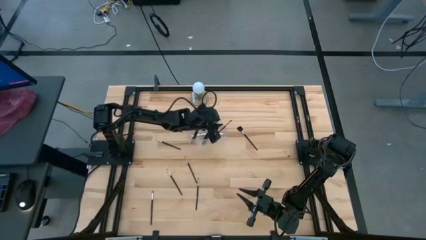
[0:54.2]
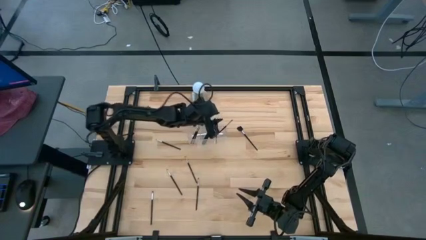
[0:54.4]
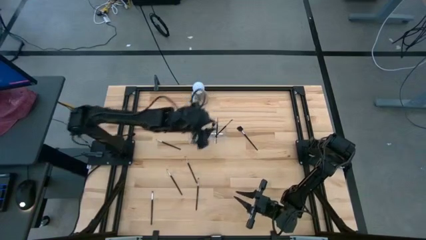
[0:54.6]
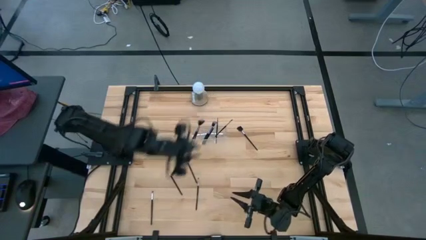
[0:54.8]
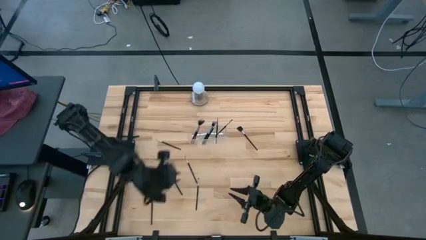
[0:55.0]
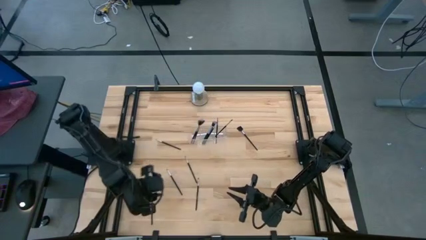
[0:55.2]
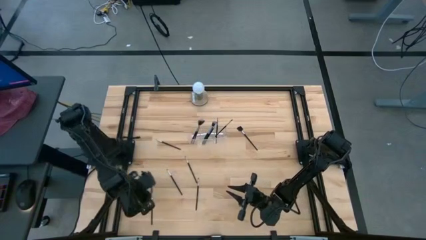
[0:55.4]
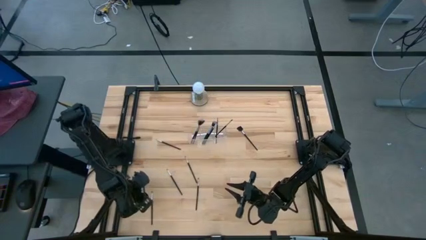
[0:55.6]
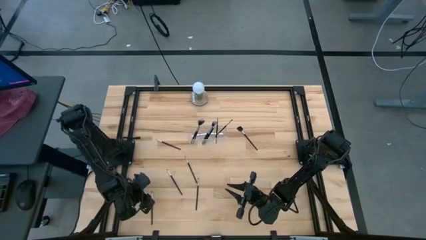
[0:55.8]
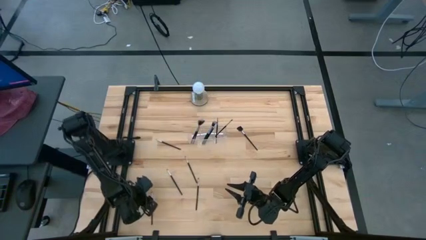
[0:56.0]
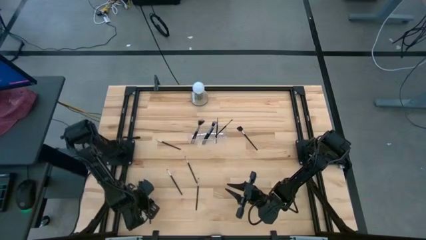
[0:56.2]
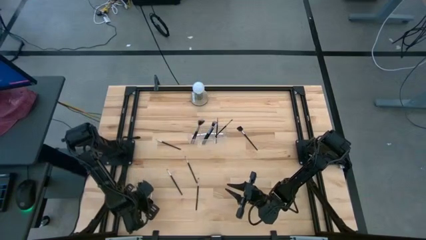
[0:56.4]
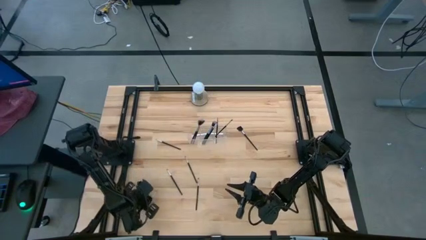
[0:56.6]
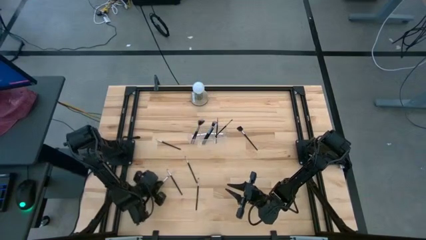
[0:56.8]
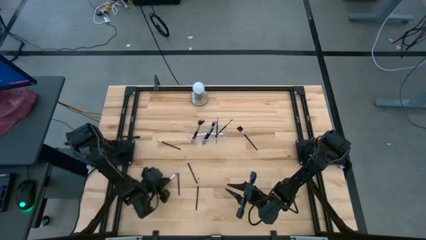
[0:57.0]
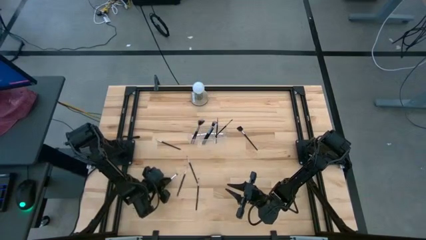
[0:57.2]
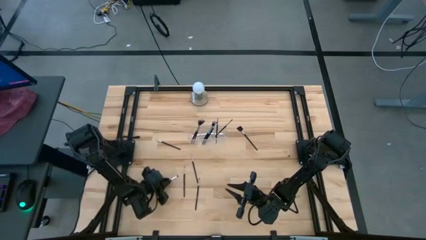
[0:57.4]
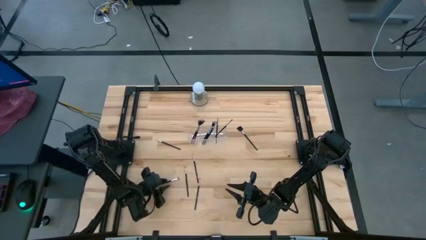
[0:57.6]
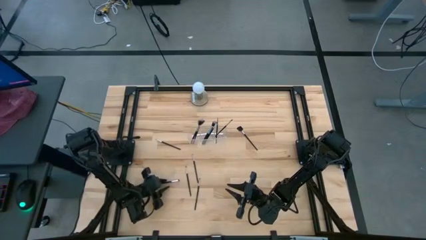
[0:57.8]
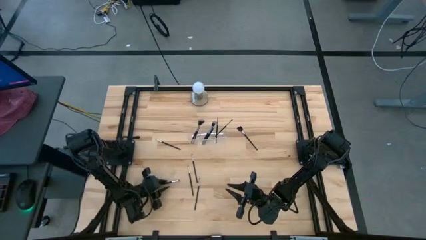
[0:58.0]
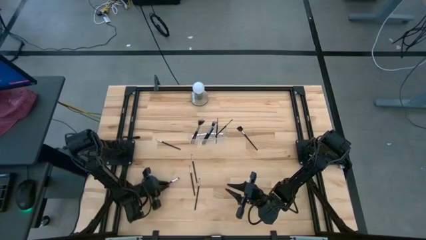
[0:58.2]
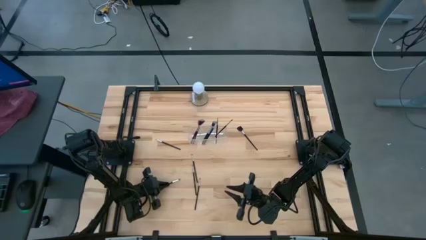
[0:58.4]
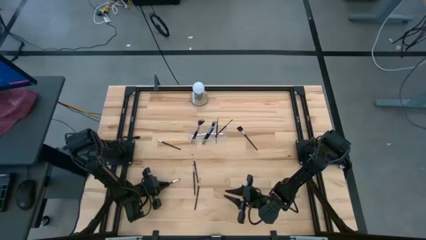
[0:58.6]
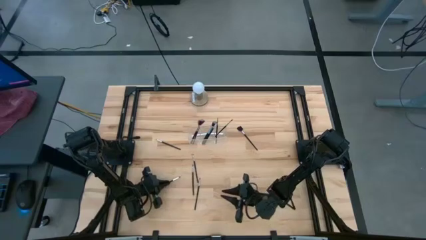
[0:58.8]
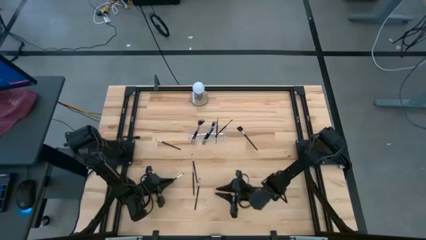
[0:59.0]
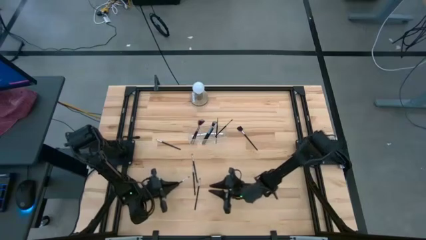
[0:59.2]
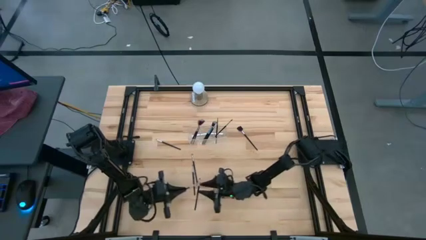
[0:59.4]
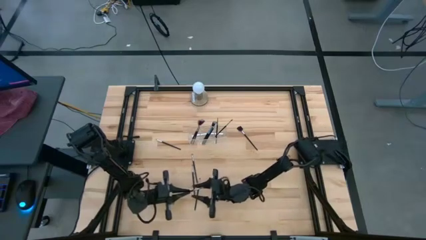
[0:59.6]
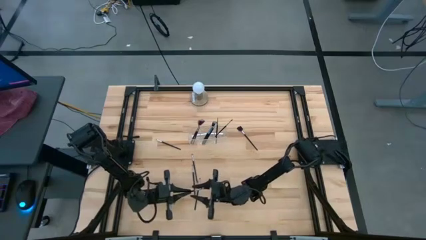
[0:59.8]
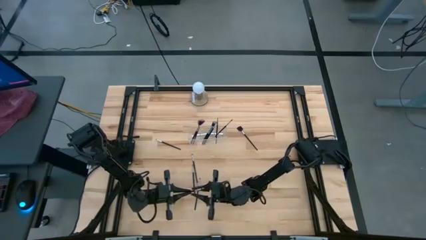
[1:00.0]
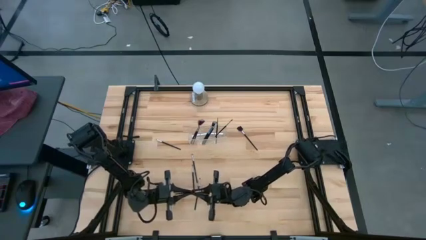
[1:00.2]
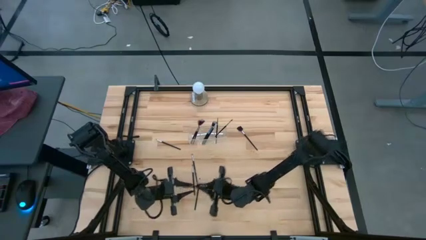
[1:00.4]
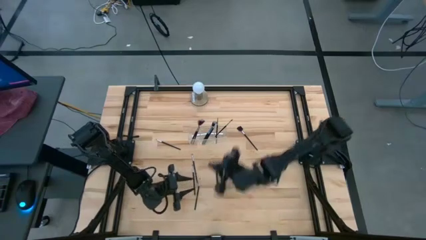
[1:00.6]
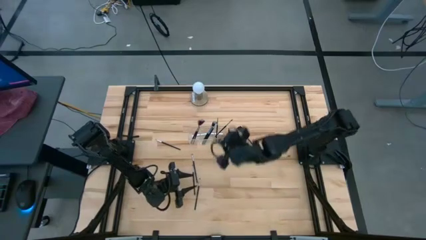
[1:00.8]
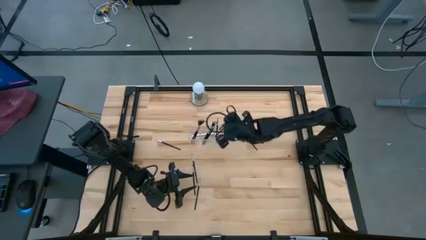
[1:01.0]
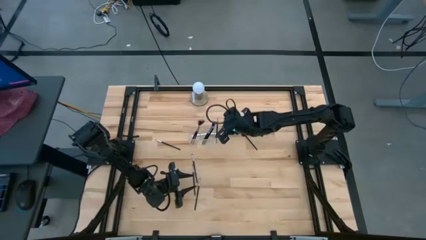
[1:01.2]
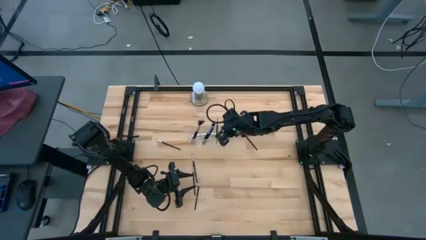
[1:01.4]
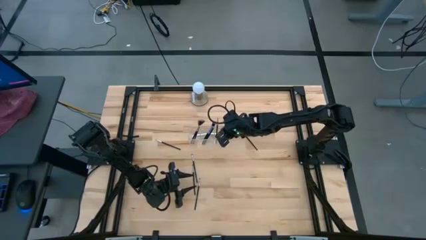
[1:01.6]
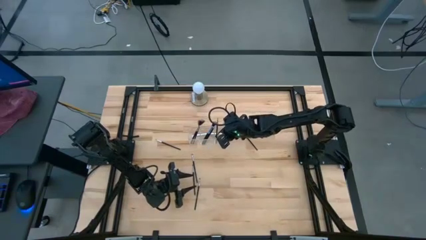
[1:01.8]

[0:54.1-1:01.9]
Task: Put items in baskets/containers
Put the eyeshadow brush into the transparent organizer

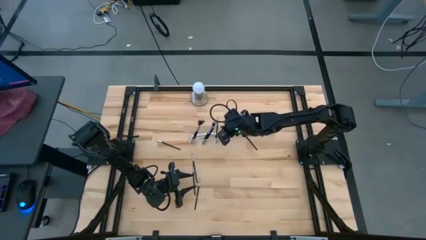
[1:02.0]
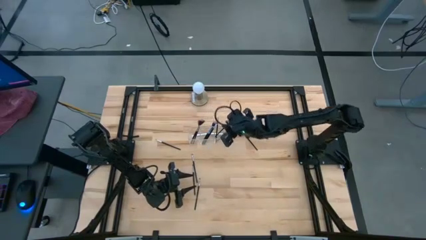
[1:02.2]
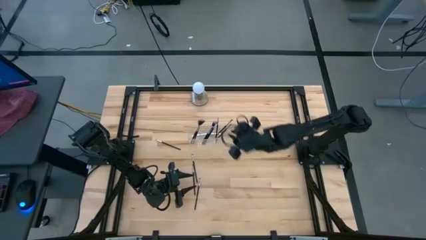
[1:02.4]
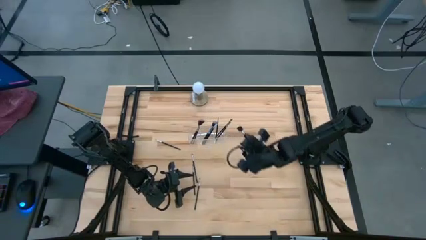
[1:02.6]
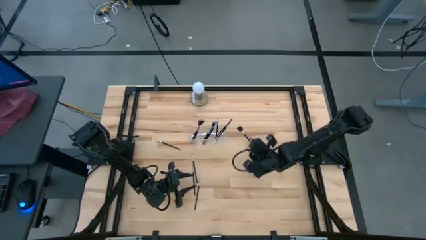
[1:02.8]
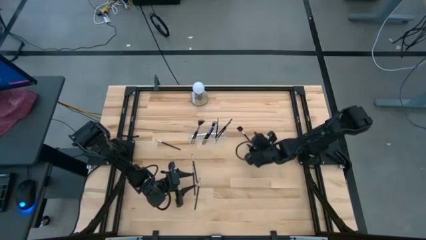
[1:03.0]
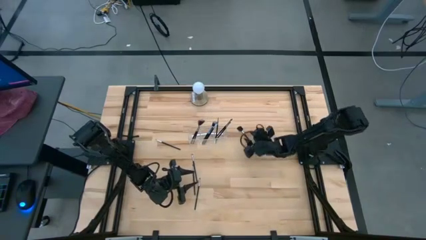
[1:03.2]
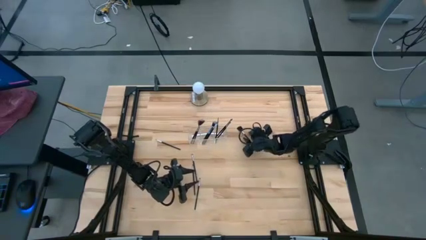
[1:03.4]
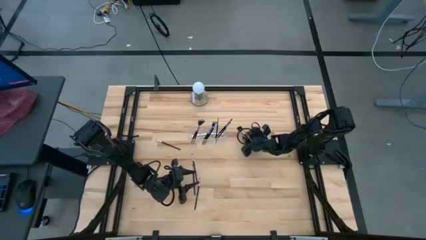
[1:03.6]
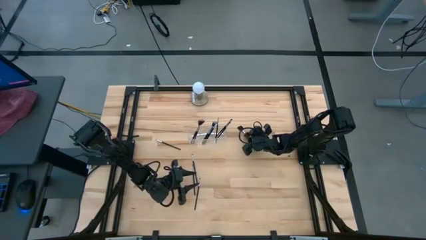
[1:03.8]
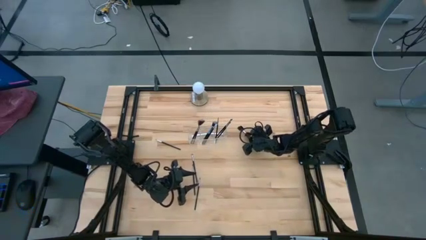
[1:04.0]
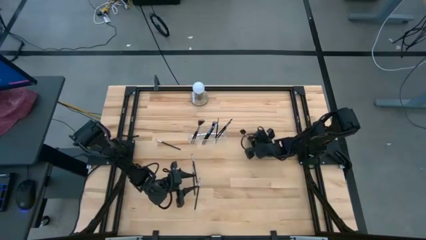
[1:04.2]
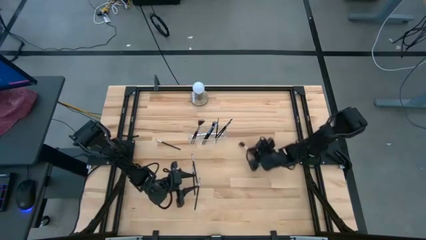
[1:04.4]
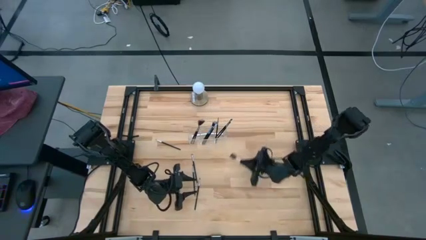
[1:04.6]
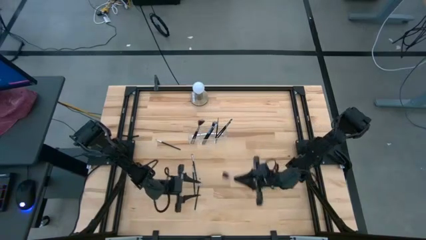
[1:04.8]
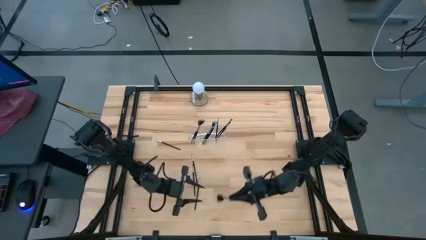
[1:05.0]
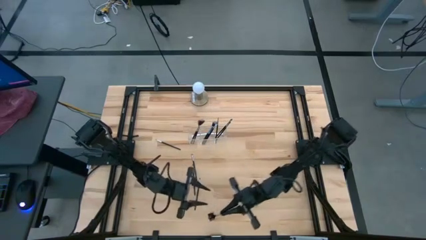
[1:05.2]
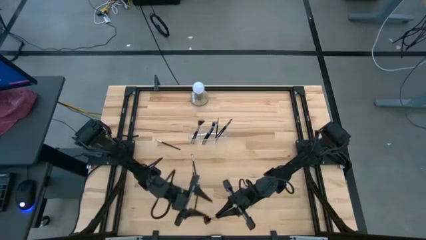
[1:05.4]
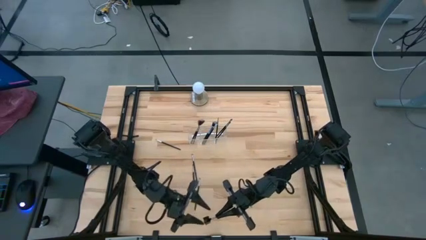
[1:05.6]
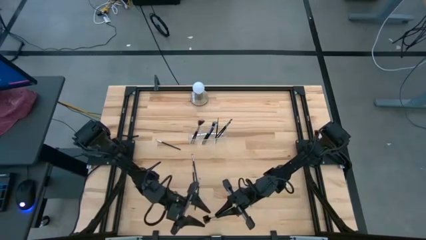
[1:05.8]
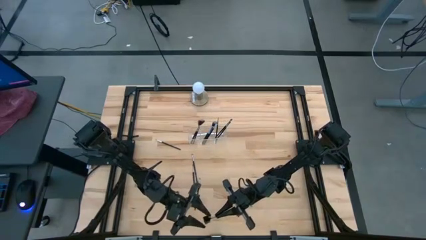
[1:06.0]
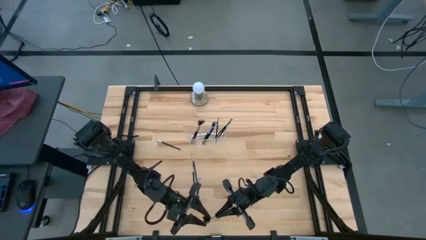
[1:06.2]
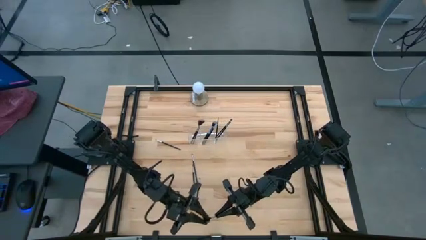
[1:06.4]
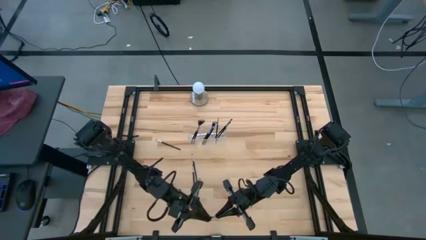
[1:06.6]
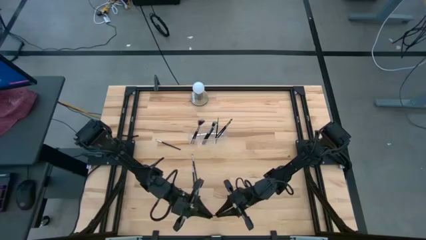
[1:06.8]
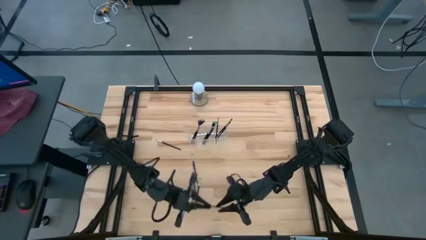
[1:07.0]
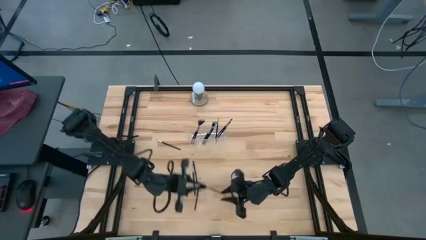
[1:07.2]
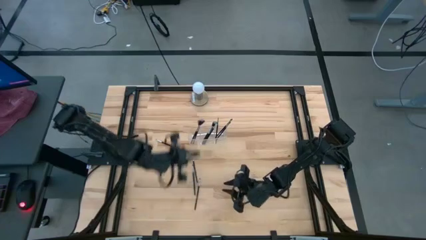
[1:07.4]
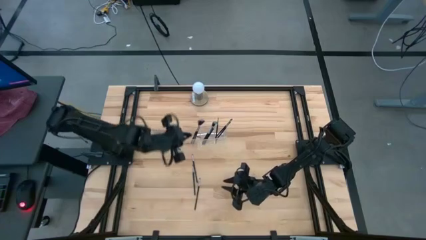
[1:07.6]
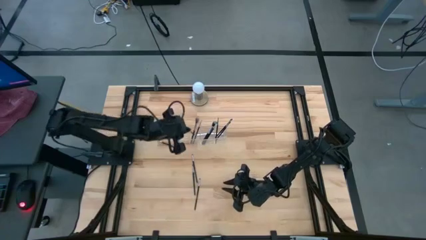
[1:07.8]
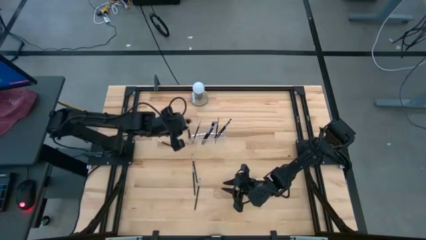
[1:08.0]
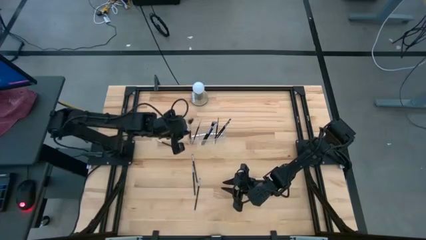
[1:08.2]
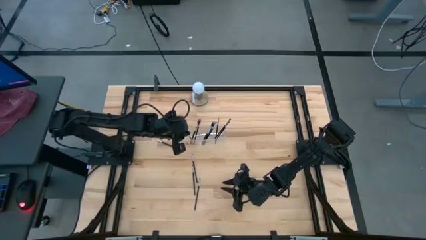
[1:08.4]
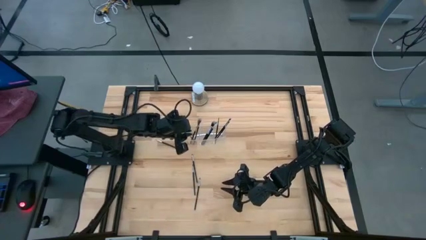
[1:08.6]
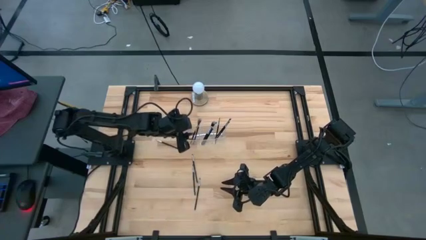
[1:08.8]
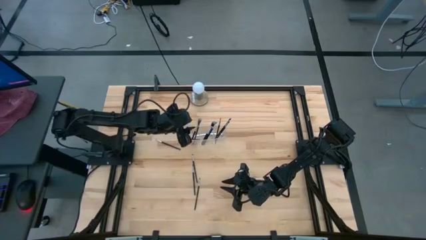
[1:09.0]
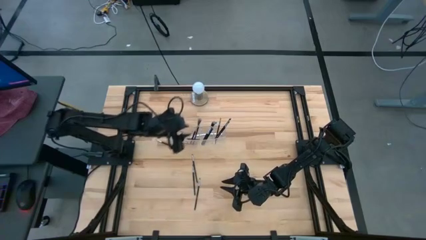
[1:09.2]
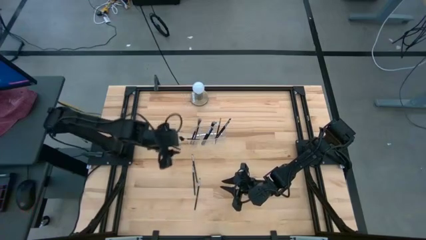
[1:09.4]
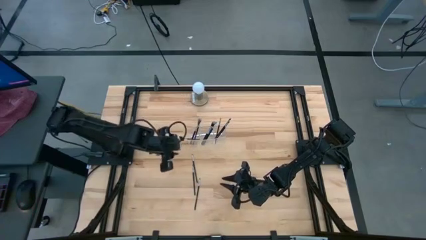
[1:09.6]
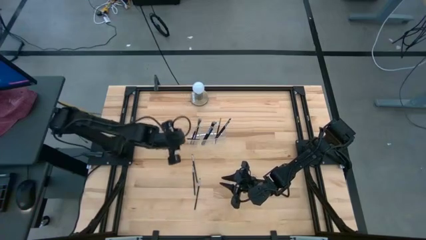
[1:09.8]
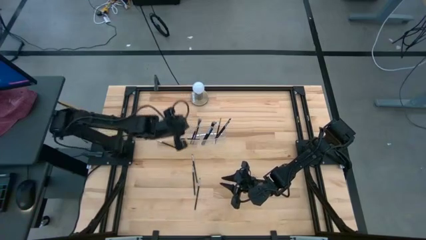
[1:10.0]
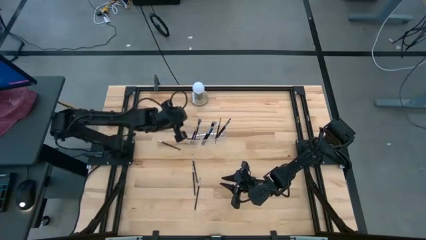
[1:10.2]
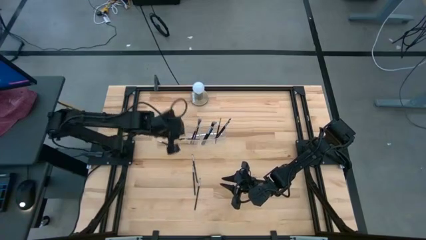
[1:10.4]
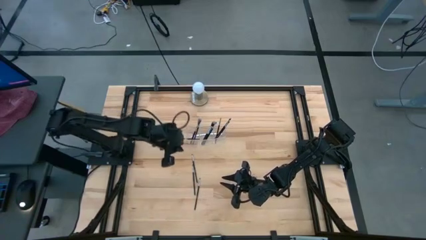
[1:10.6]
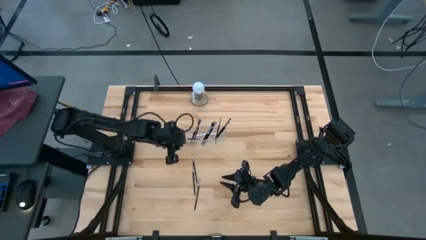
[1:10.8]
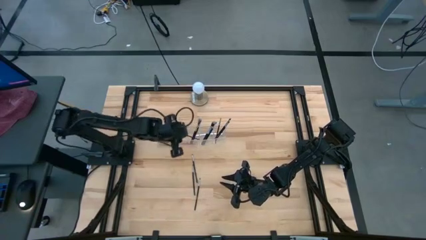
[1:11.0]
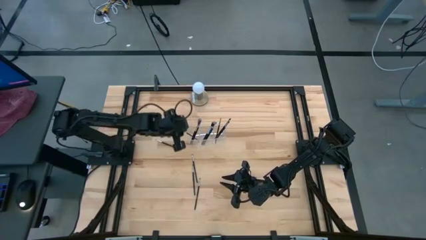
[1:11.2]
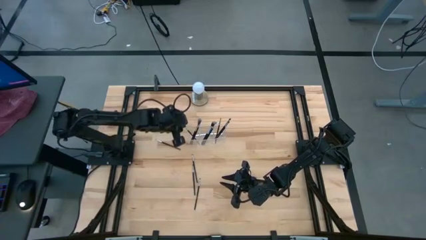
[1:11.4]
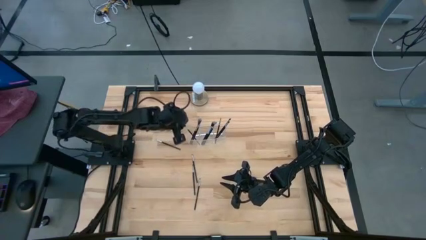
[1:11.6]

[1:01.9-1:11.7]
Put the brow brush into the transparent organizer
